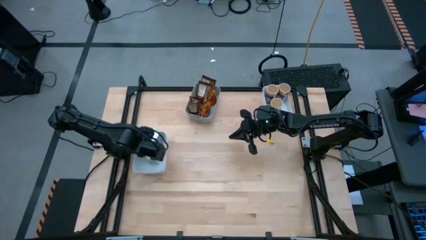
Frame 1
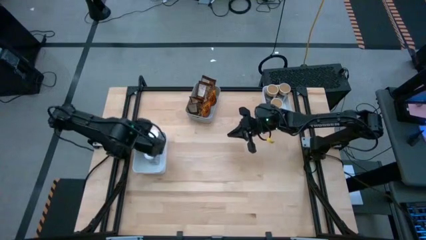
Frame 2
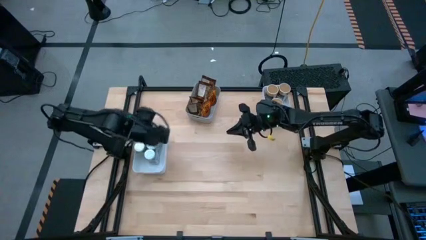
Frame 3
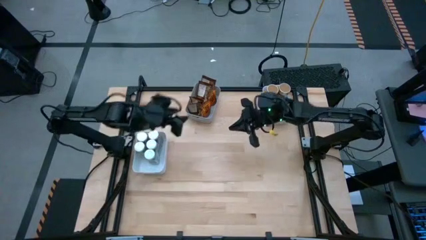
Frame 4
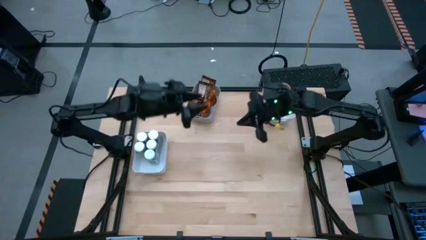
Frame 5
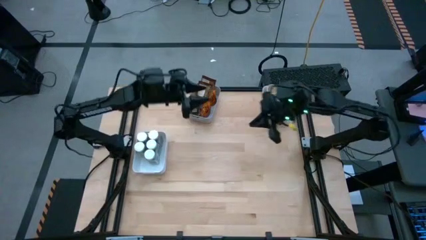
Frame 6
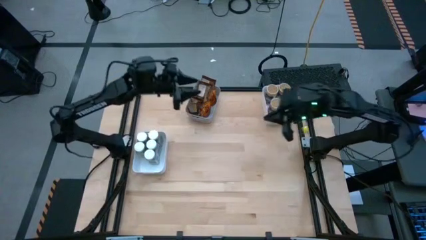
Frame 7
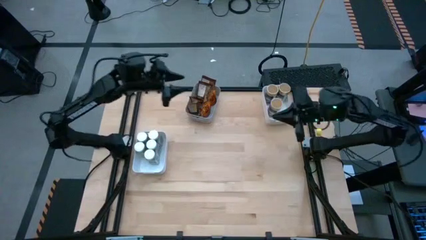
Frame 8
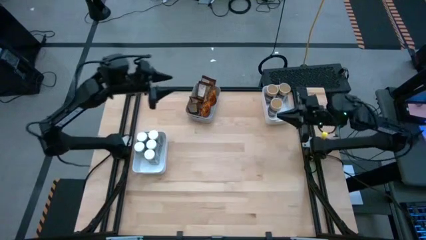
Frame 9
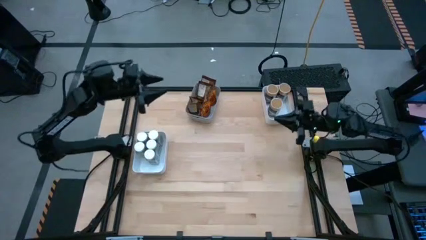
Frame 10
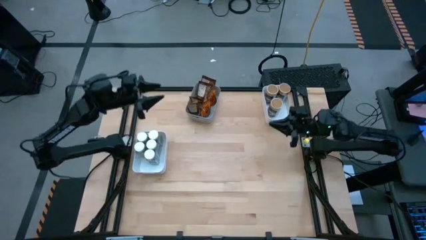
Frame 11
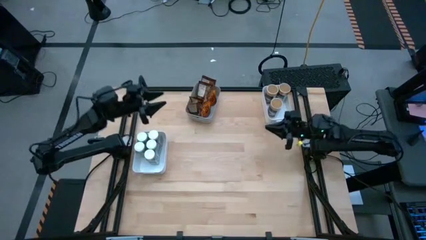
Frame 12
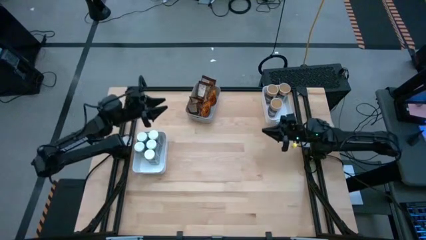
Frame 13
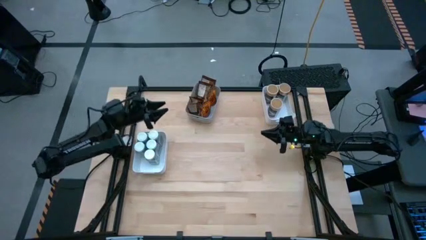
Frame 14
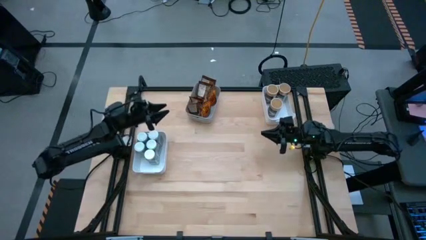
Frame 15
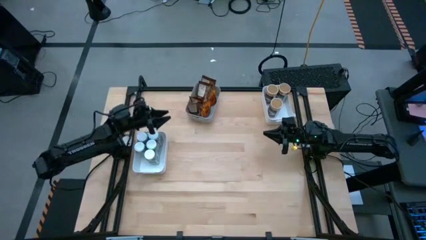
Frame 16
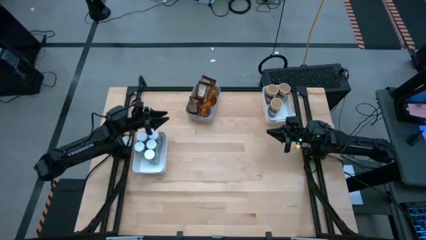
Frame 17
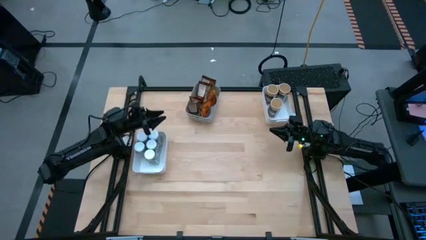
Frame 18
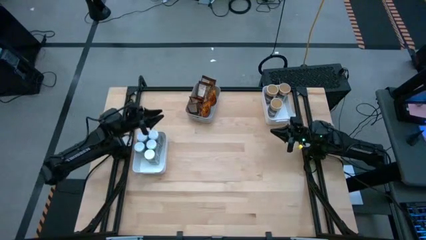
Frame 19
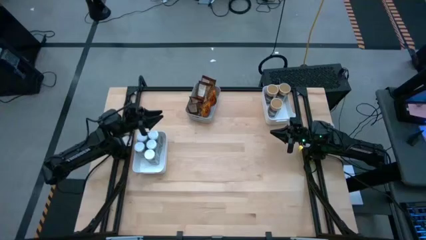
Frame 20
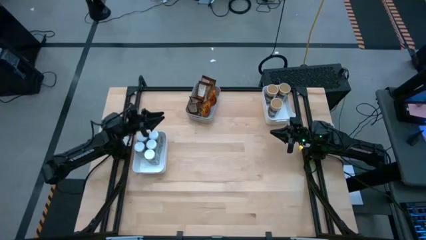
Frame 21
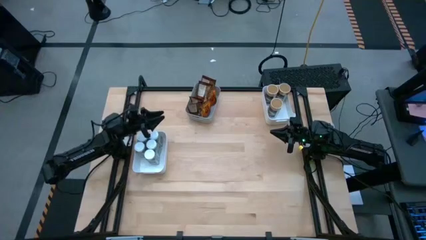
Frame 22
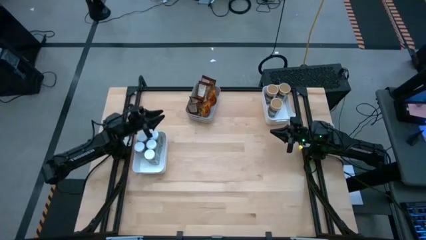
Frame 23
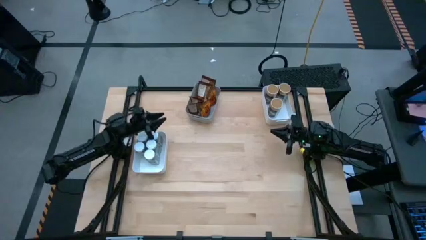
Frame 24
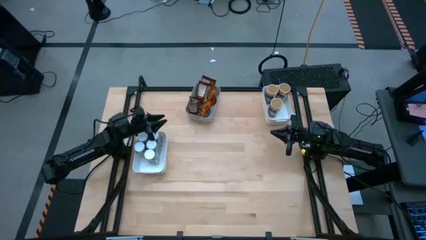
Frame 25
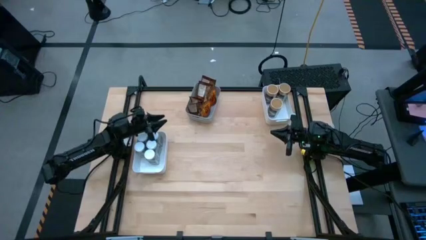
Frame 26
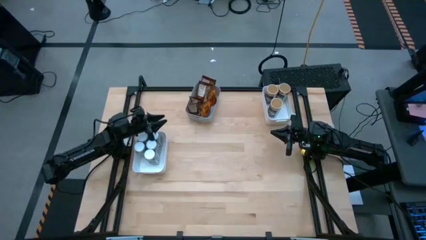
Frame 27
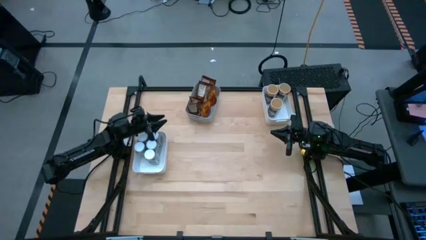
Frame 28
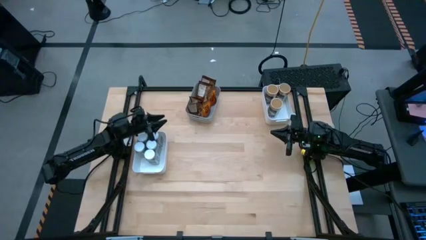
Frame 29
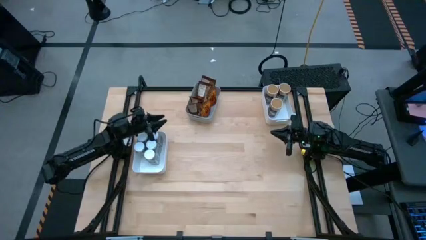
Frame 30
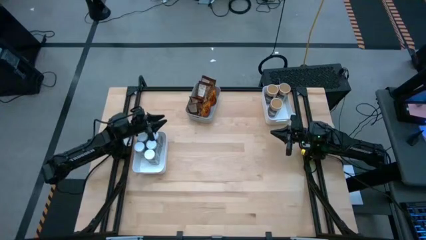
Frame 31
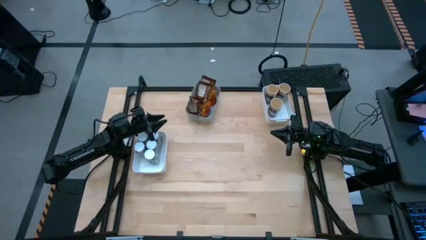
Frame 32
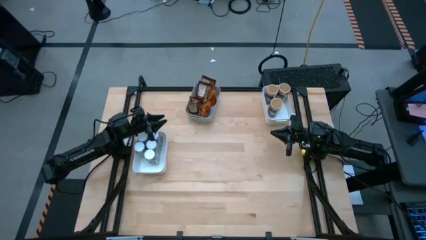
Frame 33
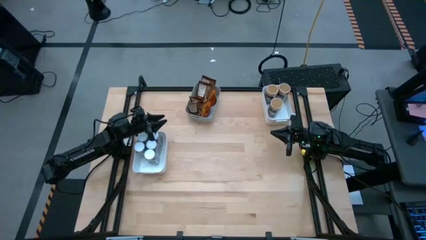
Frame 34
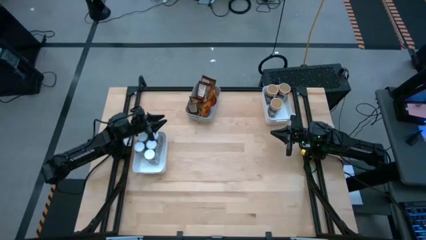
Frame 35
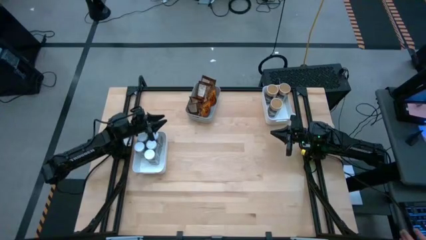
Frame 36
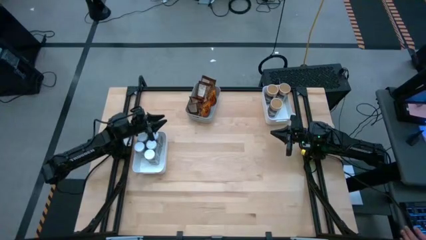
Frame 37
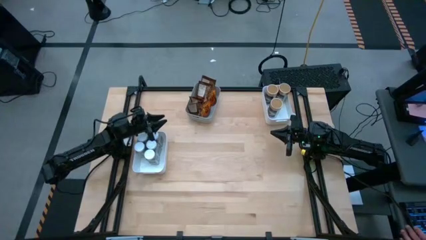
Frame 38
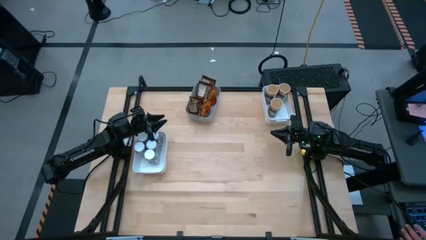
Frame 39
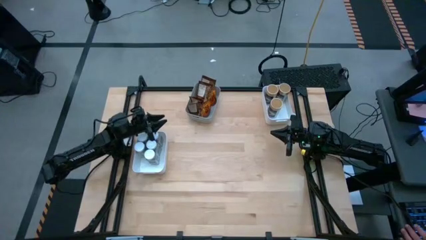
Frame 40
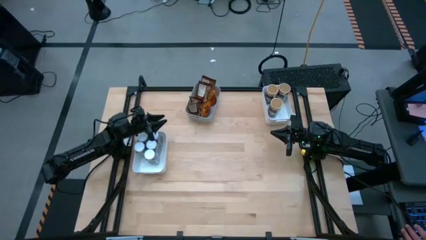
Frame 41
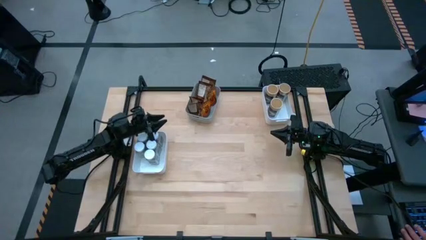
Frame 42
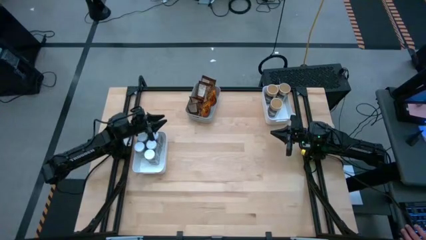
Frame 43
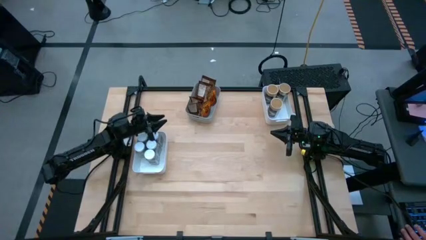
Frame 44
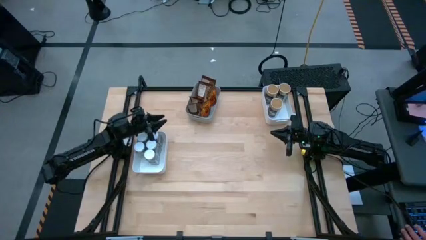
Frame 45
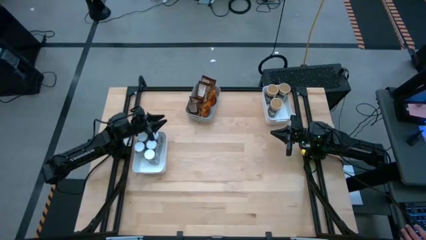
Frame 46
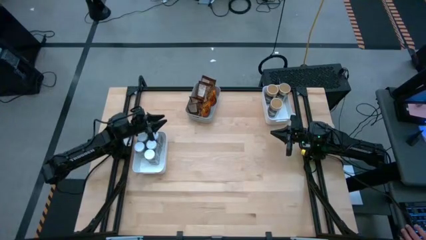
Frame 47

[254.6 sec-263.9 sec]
Task: Sort spices by type
Return to Home Position

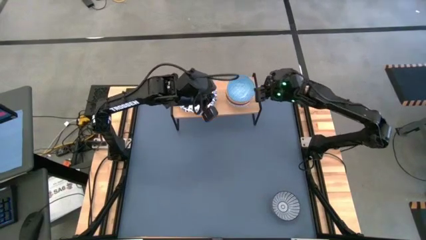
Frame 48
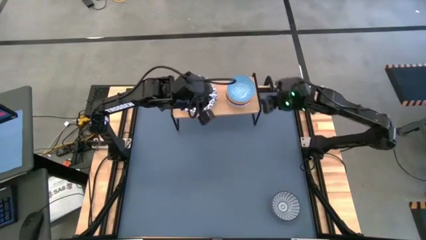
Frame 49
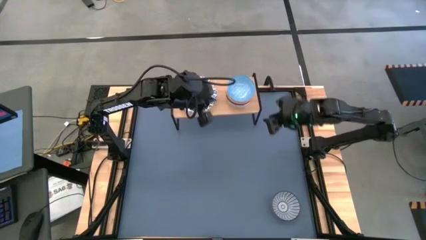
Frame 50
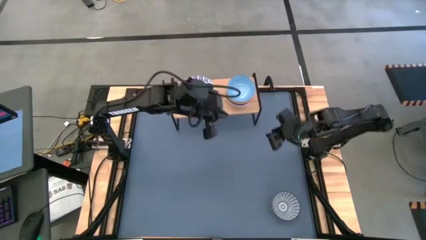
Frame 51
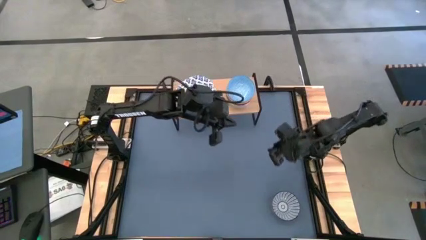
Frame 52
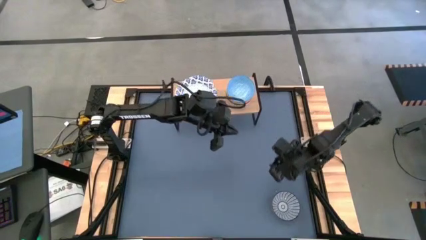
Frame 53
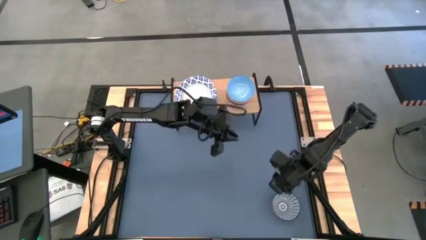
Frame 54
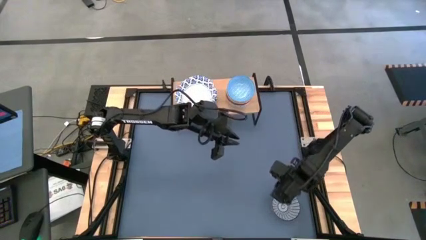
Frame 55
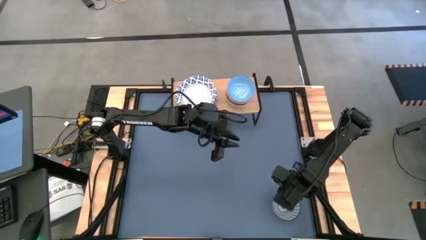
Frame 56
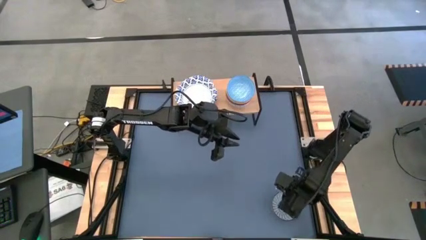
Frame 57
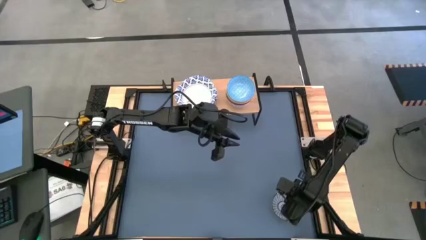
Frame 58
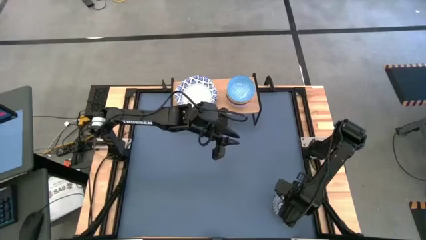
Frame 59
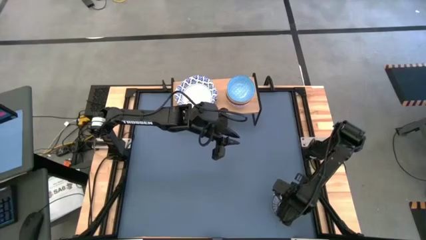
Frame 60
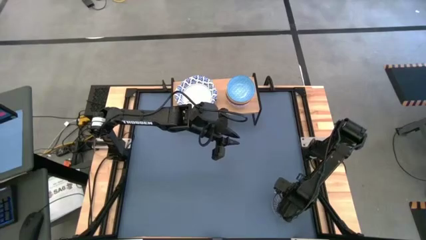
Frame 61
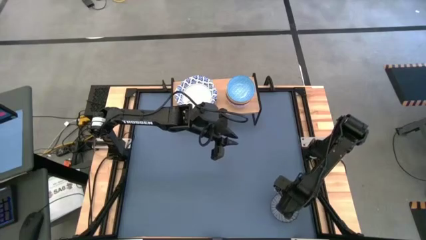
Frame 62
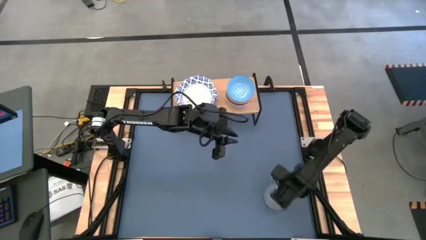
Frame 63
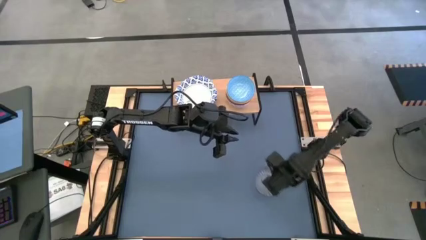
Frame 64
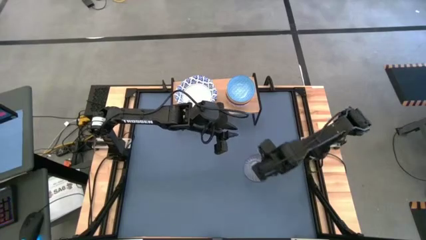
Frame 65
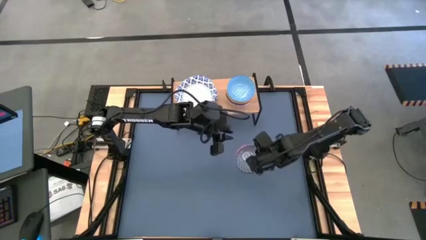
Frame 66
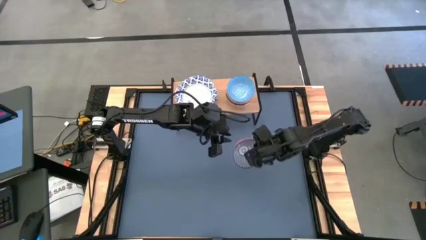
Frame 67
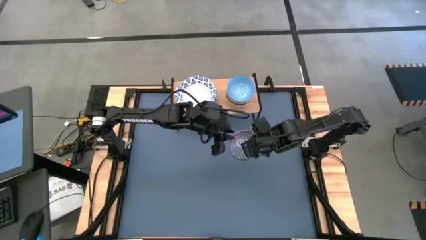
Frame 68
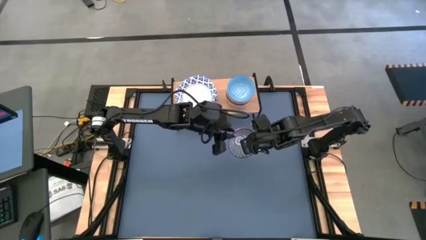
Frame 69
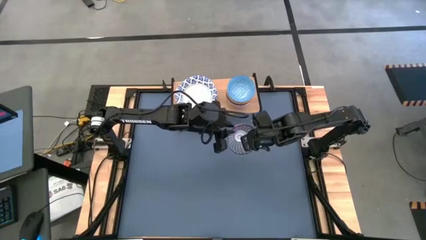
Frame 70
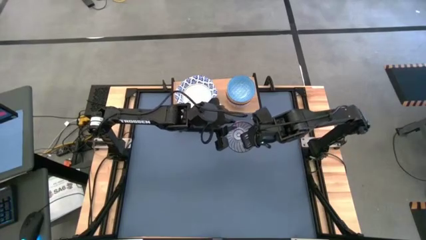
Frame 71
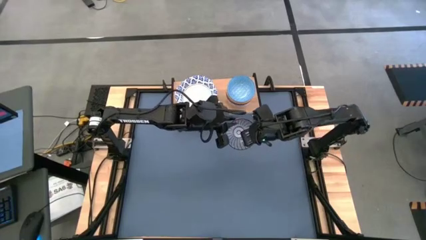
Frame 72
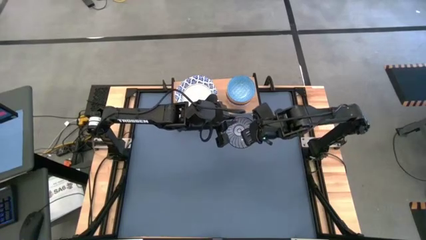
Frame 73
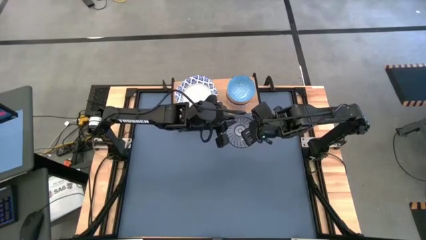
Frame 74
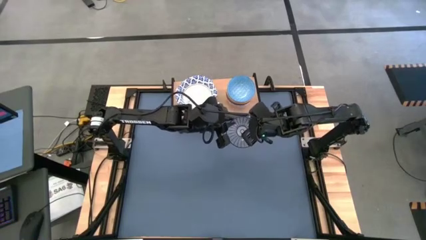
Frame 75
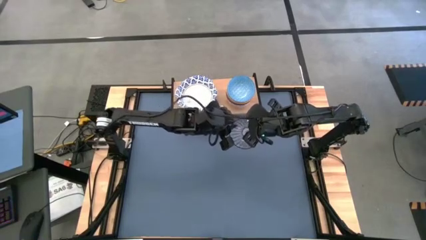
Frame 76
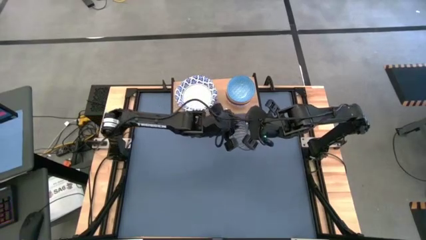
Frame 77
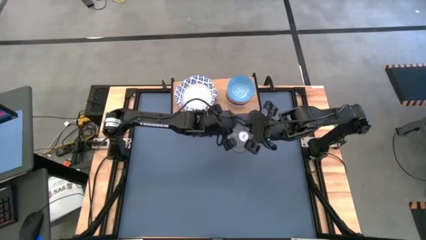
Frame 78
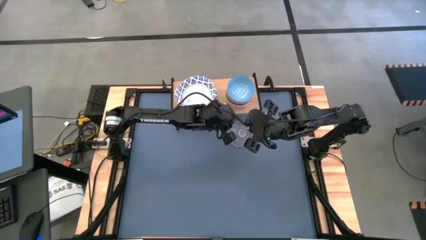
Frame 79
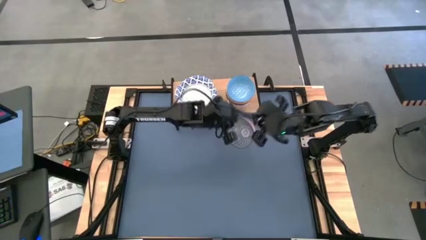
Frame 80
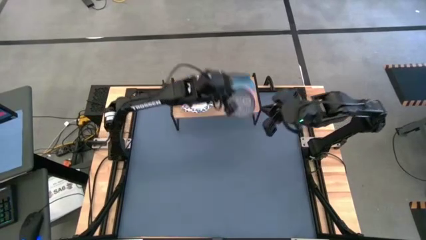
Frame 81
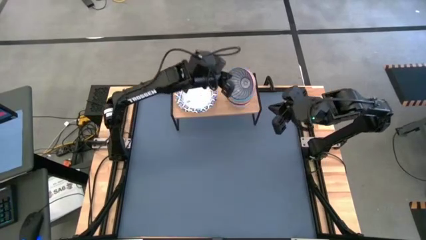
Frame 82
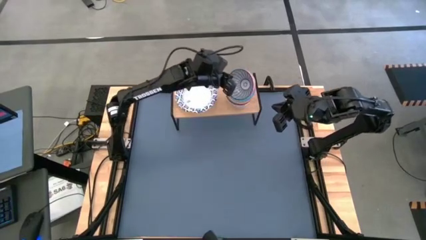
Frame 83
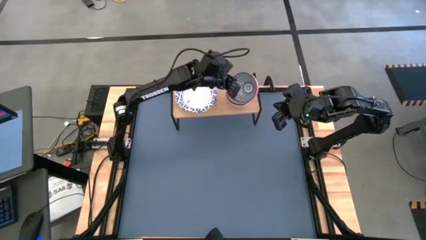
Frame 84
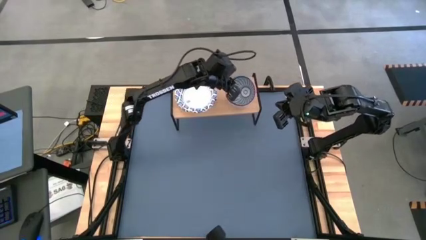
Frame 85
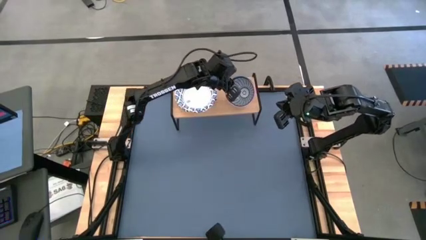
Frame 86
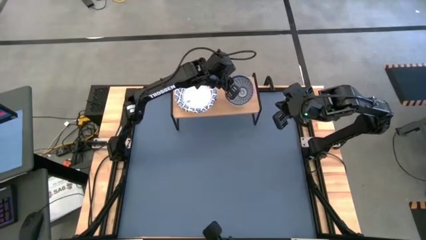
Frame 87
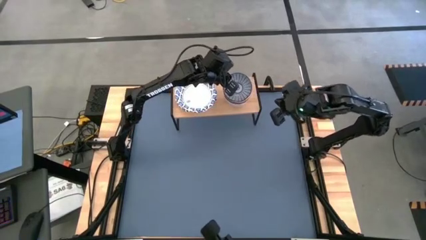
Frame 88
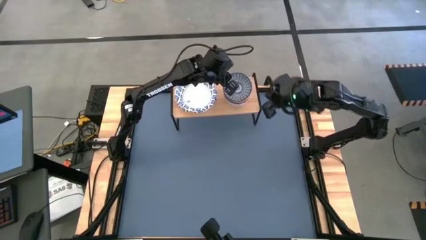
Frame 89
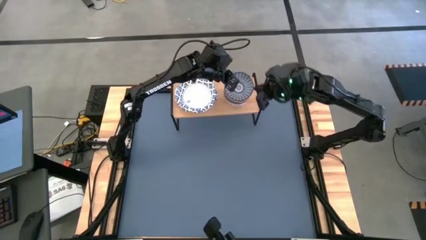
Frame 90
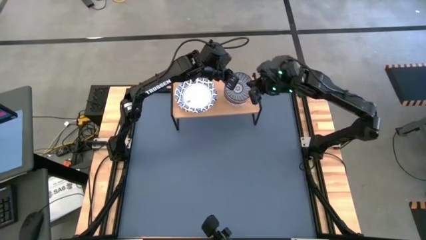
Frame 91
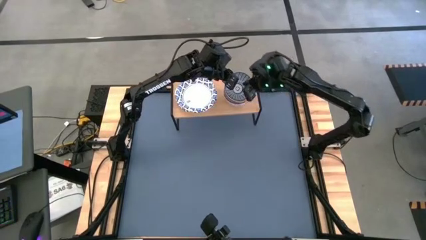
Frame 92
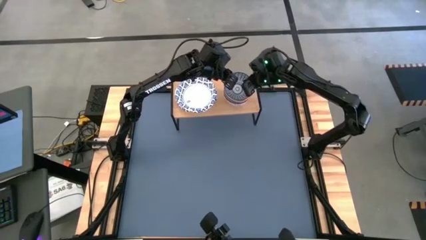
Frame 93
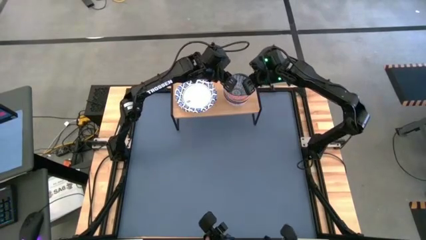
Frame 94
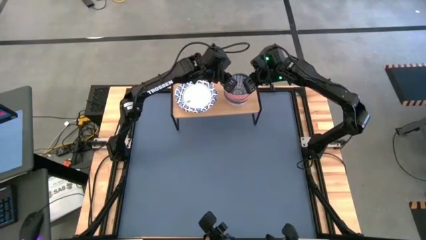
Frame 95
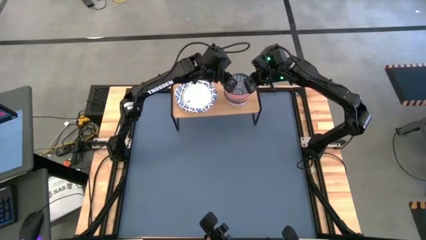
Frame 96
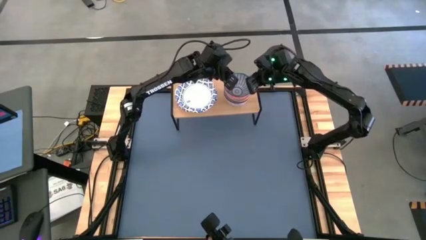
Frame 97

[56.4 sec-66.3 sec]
Task: Place and stack bowls onto a shelf
Stack the blue bowl on top of the light blue bowl on the shelf
